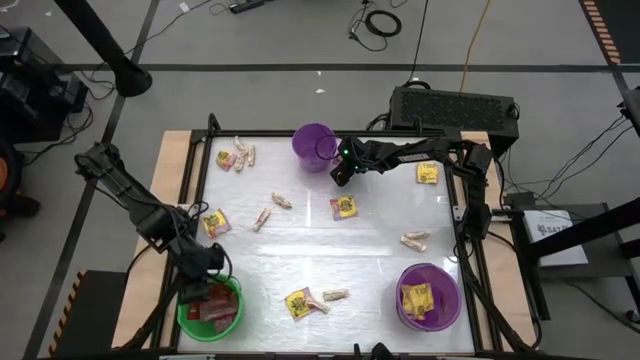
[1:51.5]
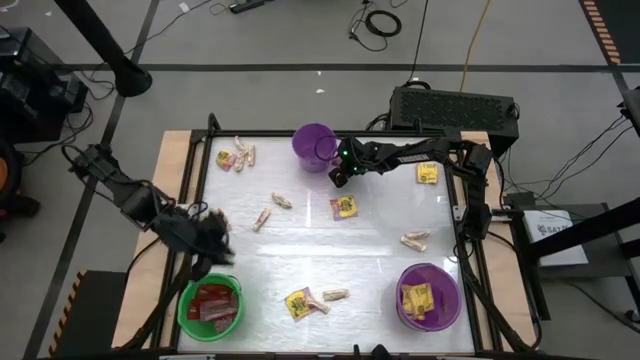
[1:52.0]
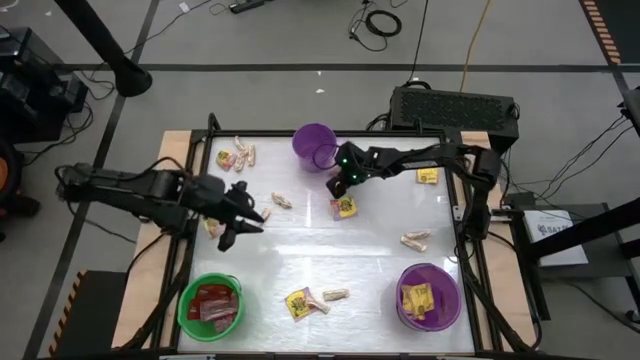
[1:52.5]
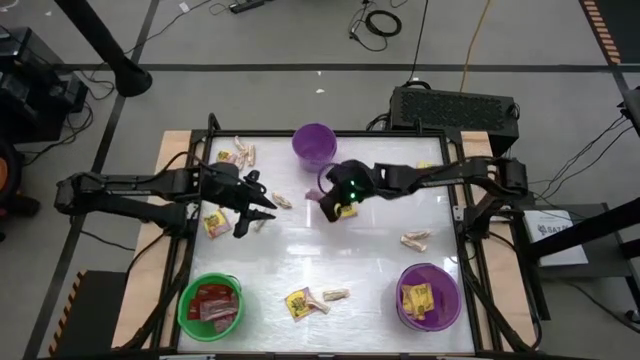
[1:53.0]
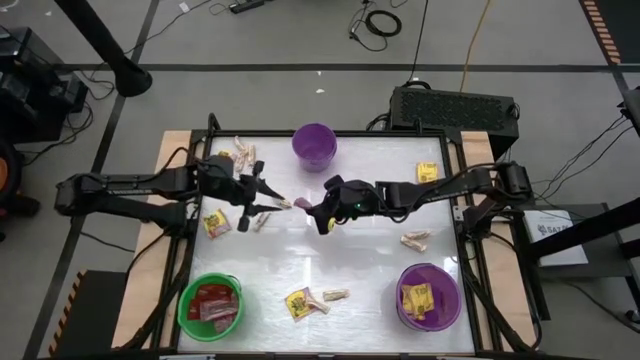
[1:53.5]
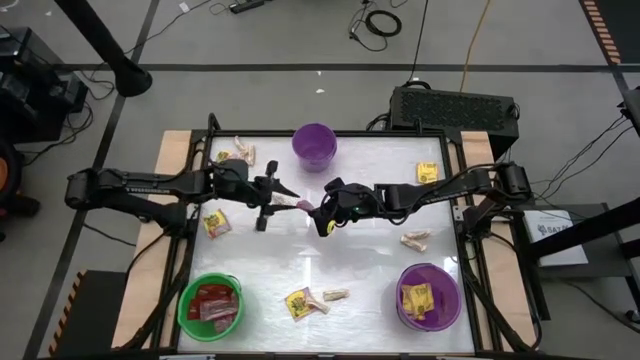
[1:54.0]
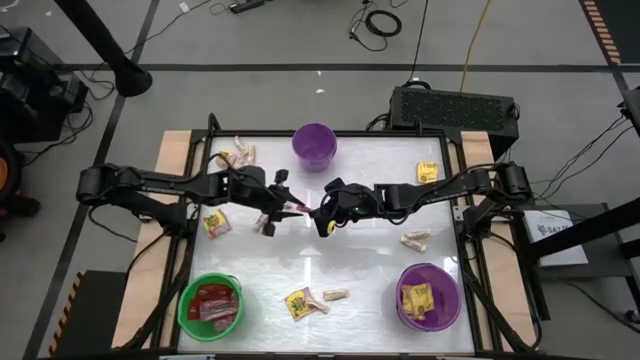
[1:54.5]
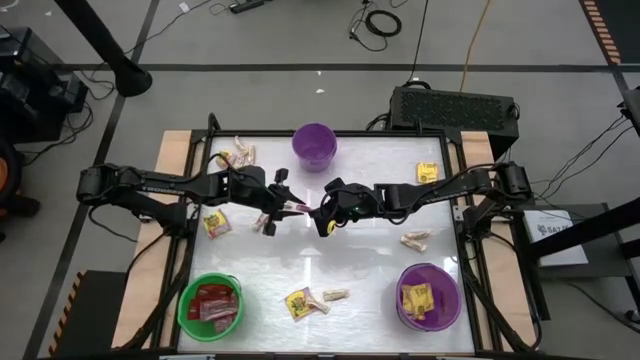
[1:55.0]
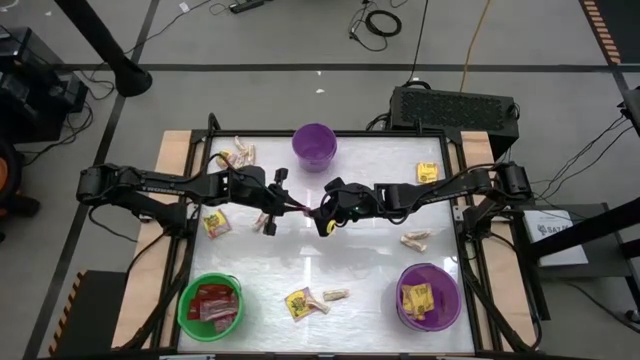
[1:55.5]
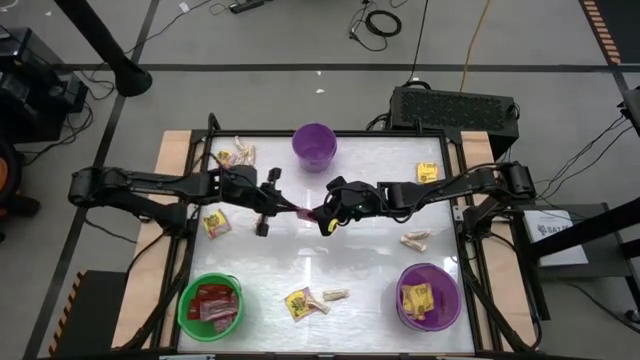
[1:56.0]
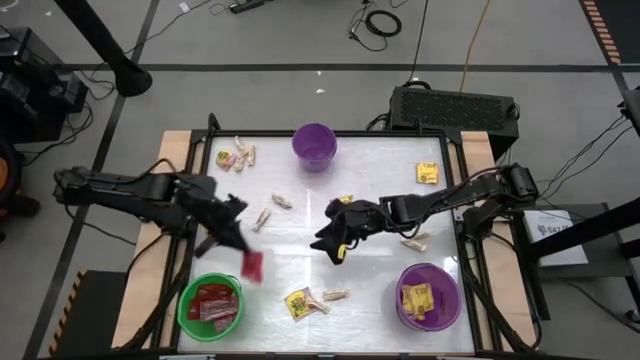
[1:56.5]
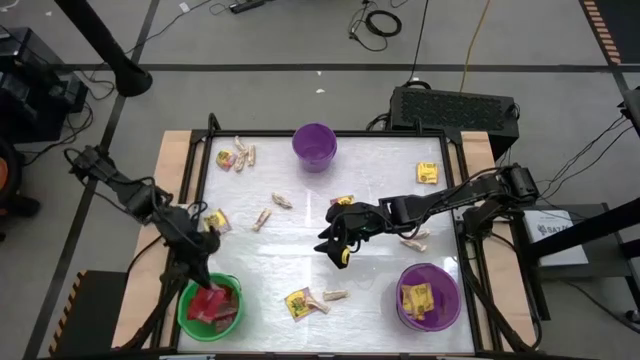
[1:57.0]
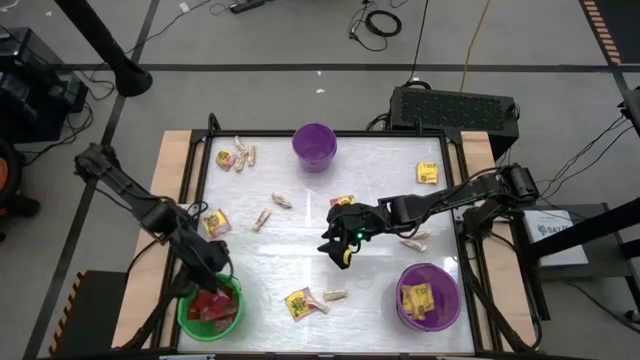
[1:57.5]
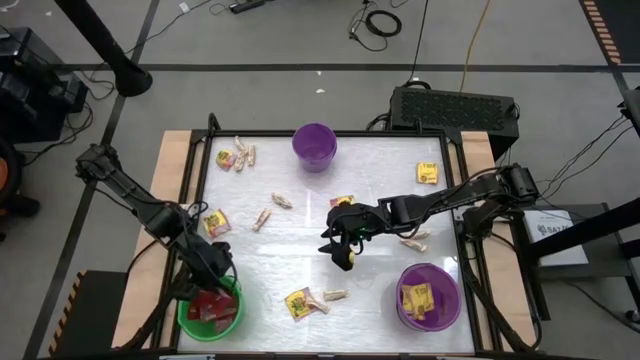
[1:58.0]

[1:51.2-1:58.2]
Task: Sort candy by brand, put in halloween buckets
Put the red candy into the green bucket

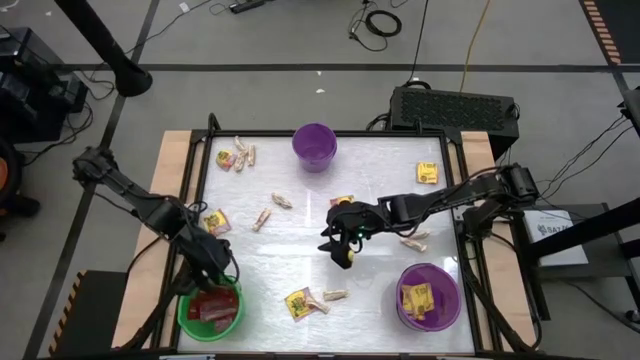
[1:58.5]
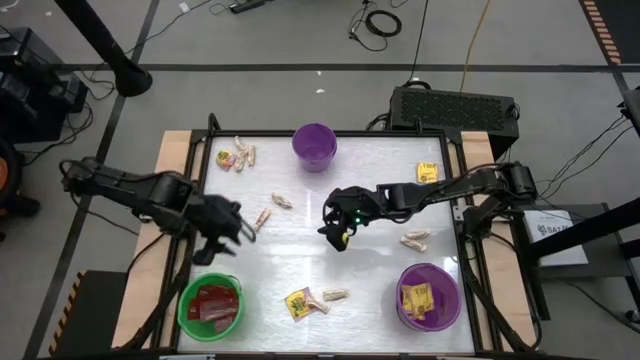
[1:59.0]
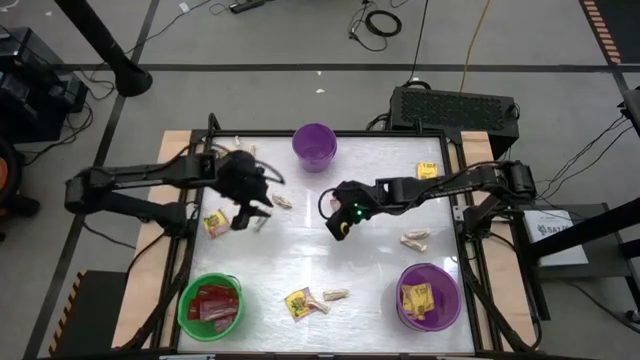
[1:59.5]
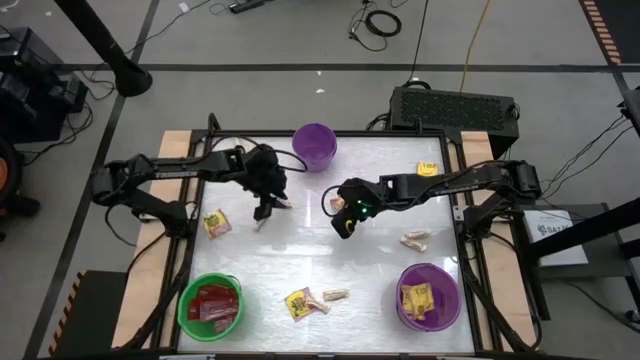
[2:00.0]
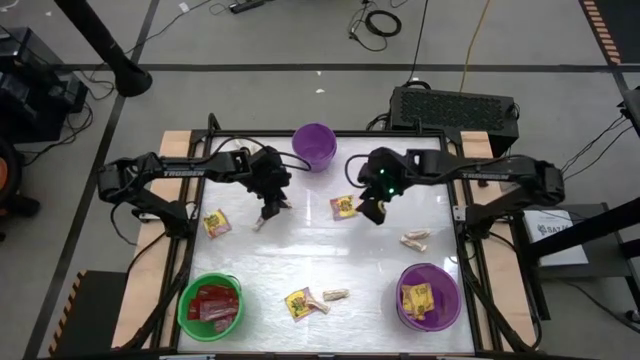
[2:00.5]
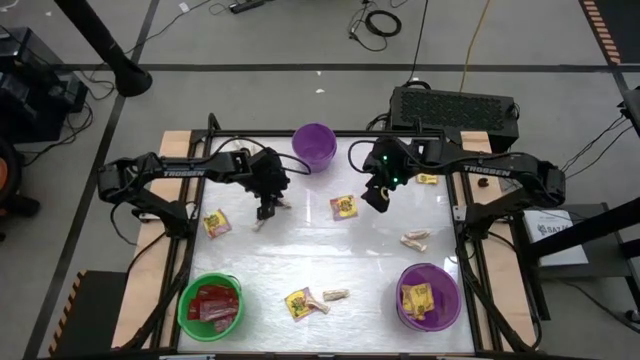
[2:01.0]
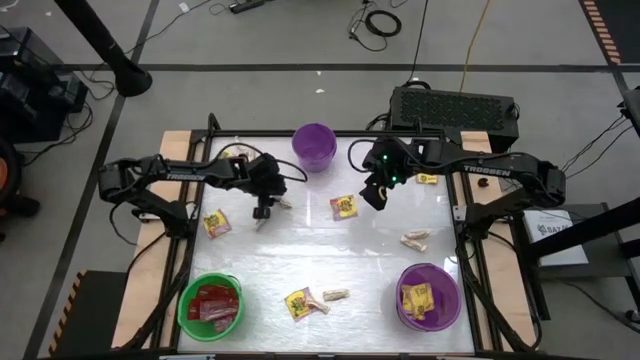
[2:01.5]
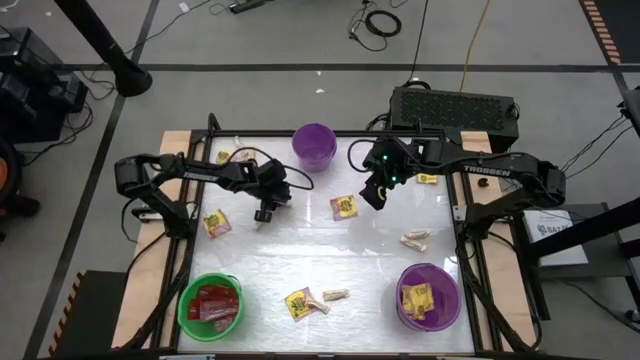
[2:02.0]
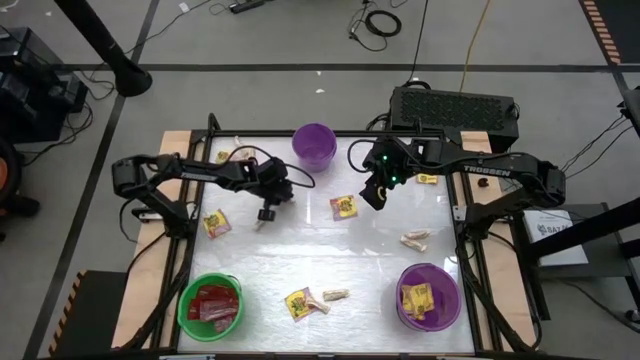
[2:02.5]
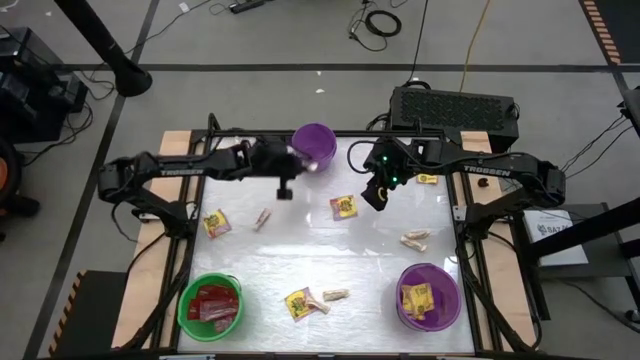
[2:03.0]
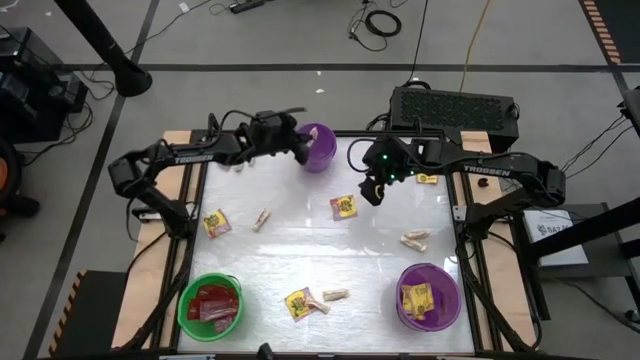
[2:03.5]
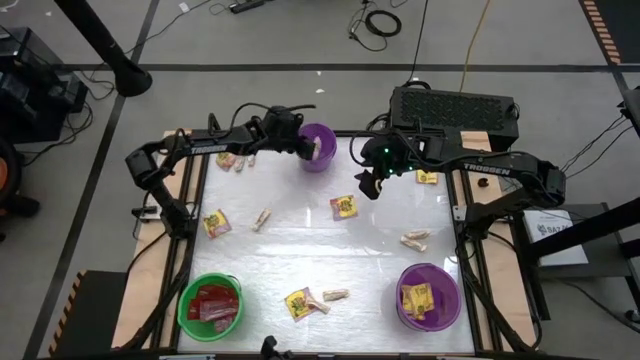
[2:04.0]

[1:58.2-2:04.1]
Put the white chocolate into the top purple bucket

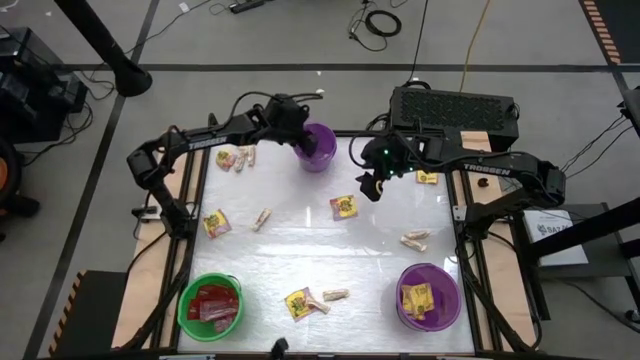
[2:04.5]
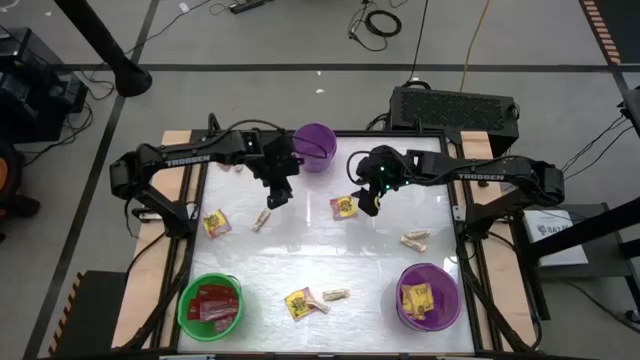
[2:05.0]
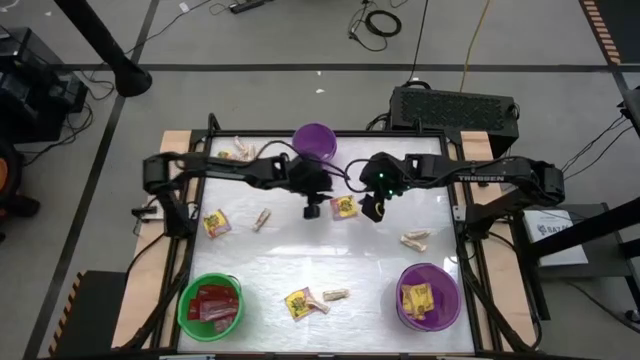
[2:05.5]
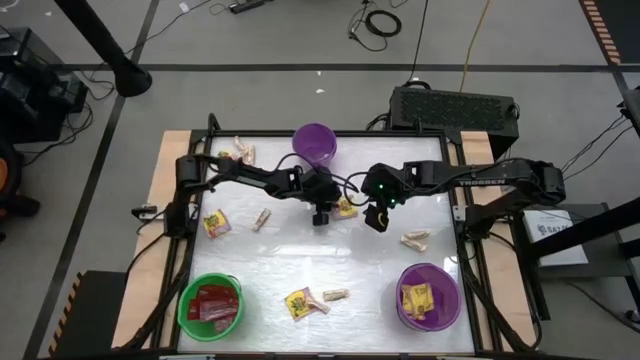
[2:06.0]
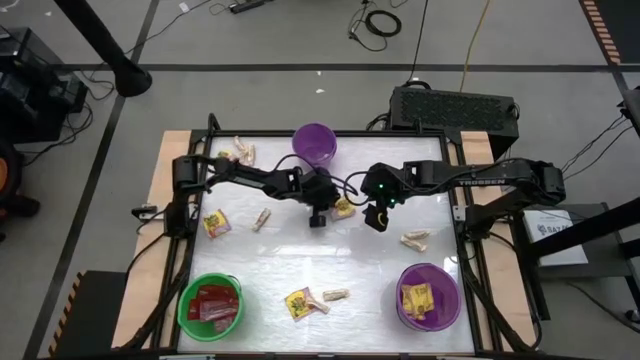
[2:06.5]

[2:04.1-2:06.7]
Put the yellow candy into the bottom purple bucket

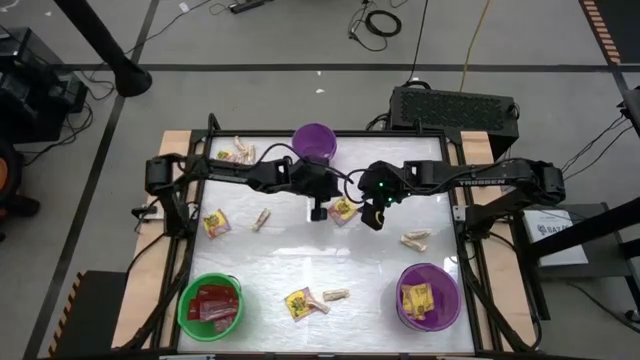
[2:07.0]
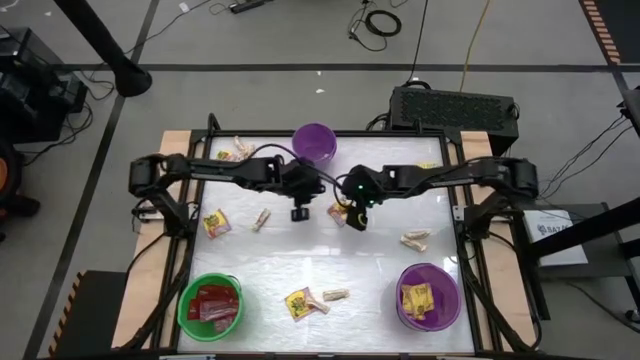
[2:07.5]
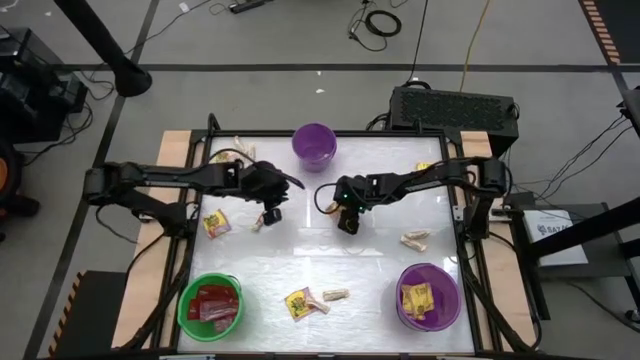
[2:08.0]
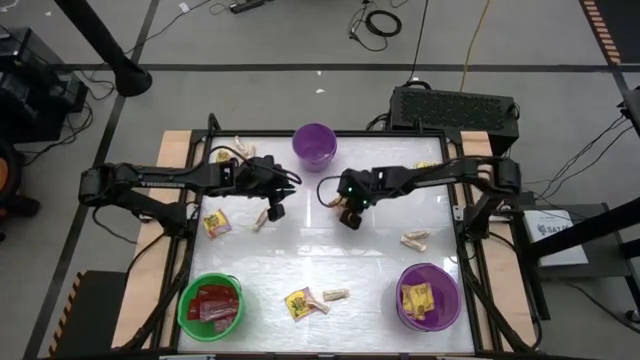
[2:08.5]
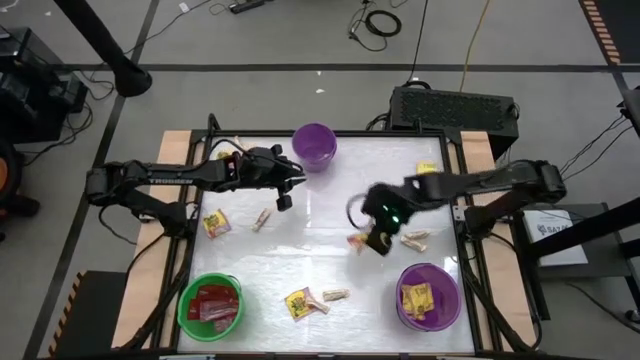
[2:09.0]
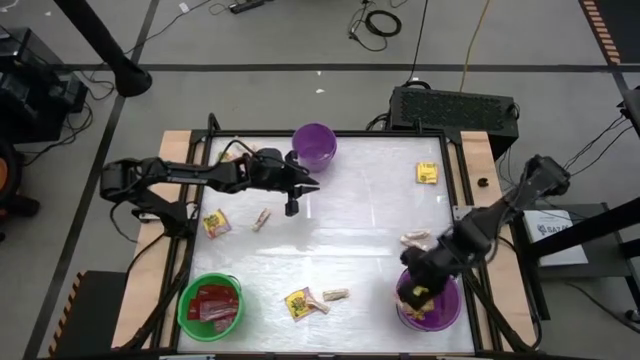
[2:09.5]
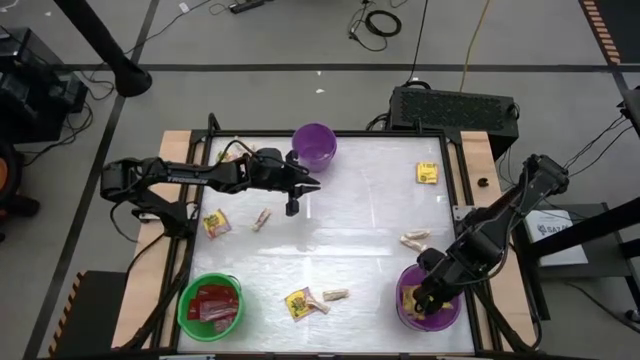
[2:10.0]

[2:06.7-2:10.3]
Put the yellow candy into the bottom purple bucket

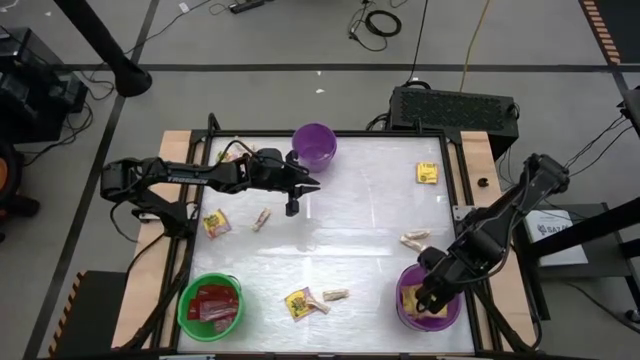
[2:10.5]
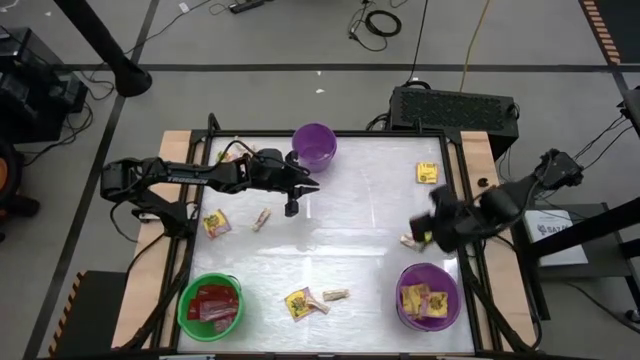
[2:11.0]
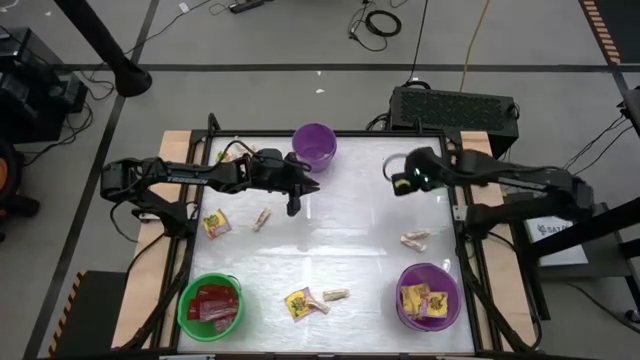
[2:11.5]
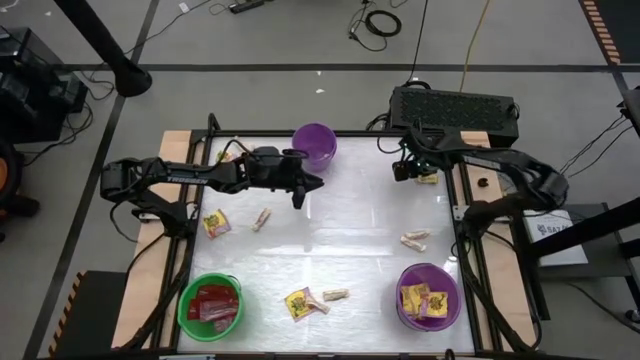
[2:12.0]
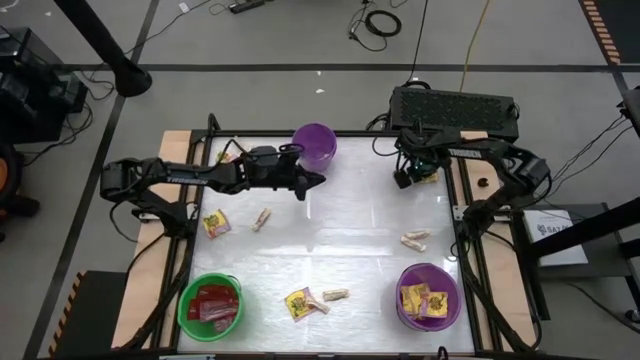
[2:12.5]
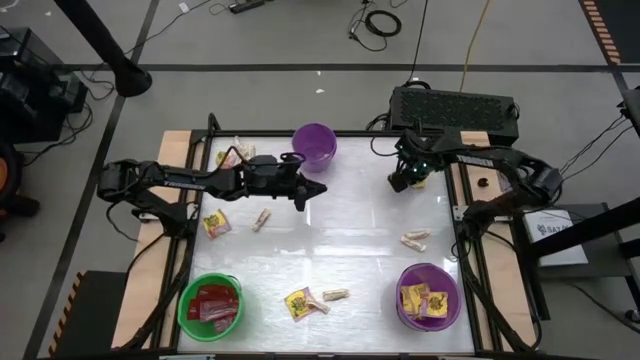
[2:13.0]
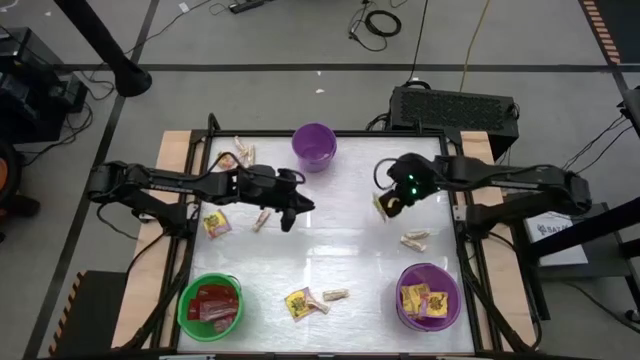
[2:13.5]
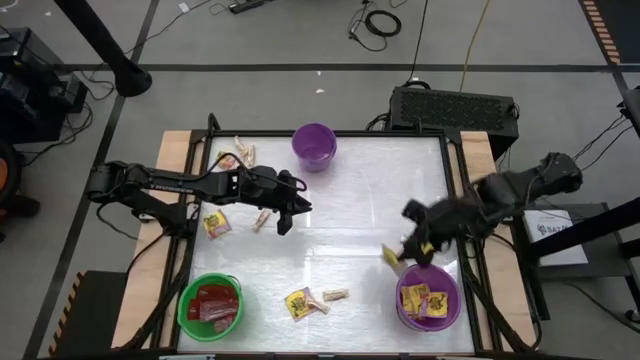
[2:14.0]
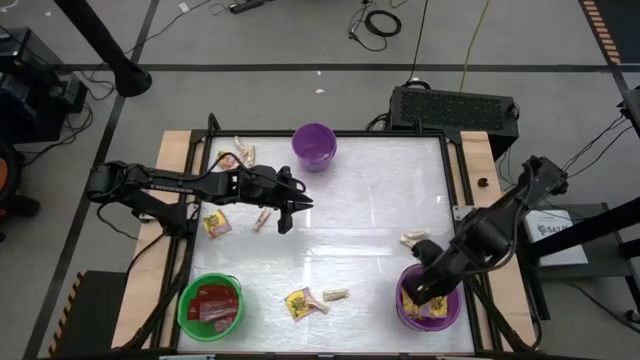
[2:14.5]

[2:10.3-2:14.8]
Put the yellow candy into the bottom purple bucket
